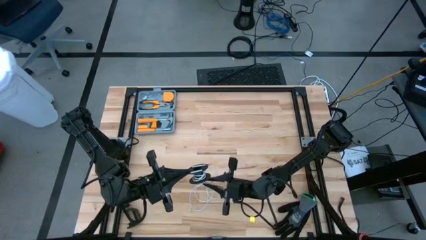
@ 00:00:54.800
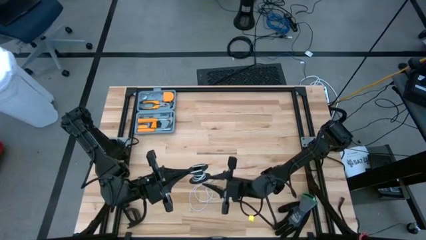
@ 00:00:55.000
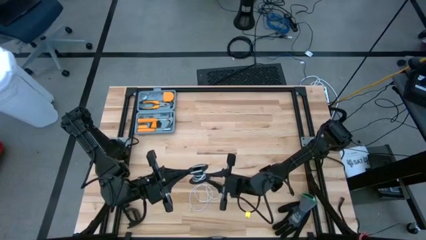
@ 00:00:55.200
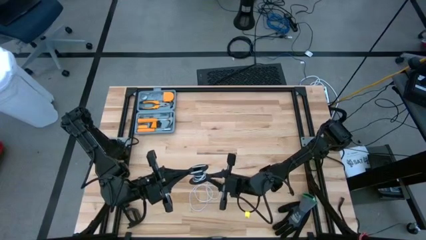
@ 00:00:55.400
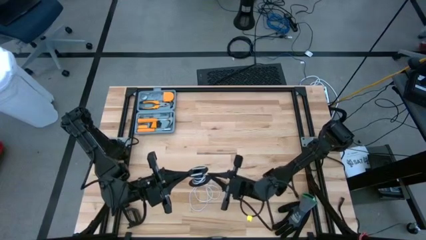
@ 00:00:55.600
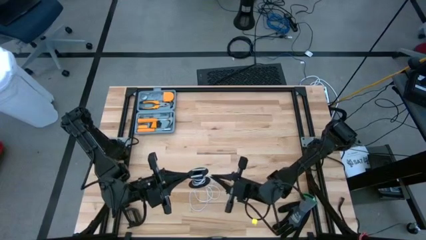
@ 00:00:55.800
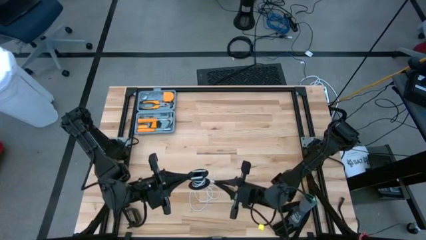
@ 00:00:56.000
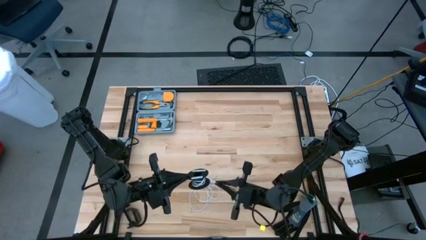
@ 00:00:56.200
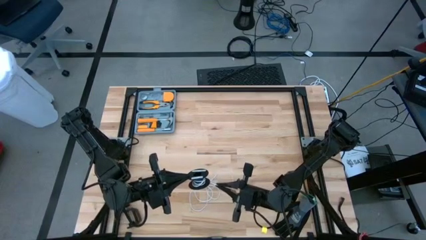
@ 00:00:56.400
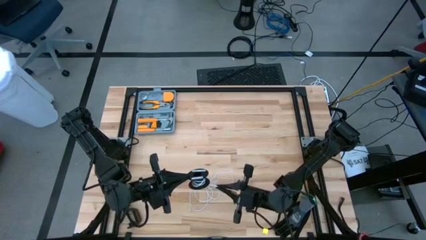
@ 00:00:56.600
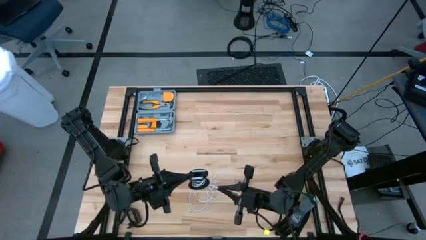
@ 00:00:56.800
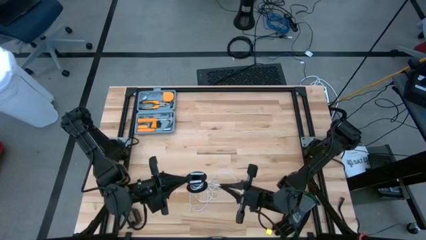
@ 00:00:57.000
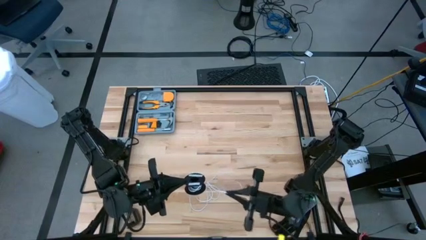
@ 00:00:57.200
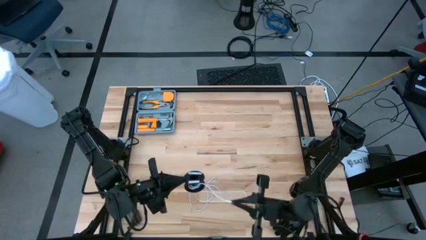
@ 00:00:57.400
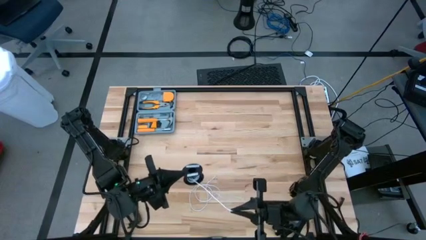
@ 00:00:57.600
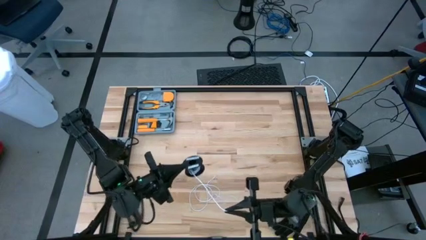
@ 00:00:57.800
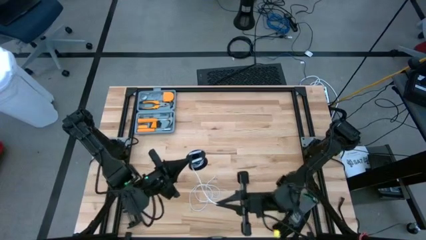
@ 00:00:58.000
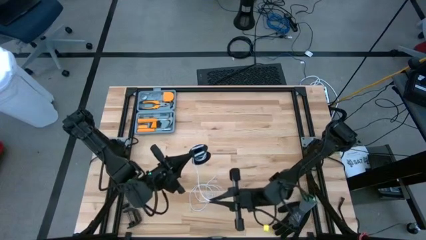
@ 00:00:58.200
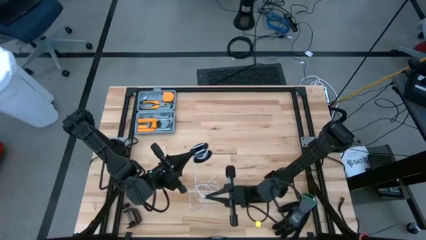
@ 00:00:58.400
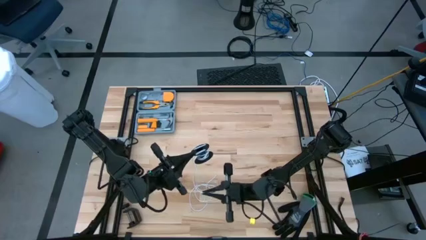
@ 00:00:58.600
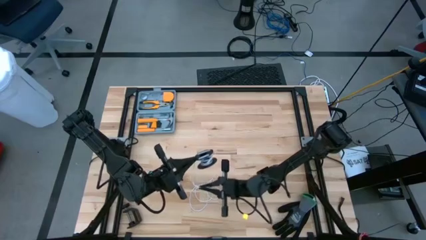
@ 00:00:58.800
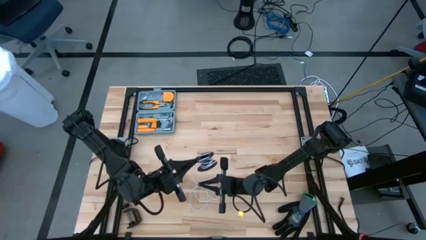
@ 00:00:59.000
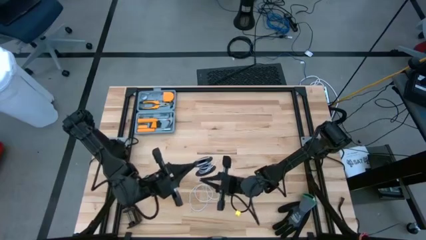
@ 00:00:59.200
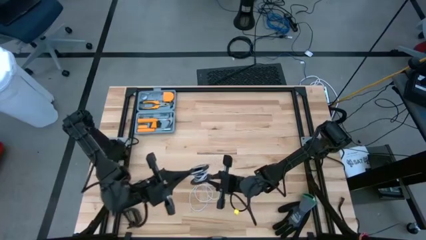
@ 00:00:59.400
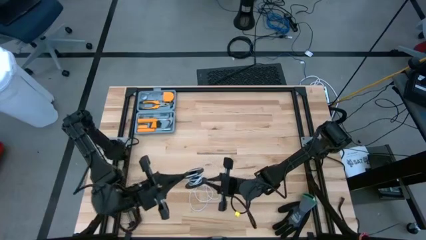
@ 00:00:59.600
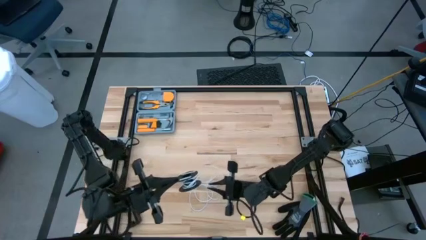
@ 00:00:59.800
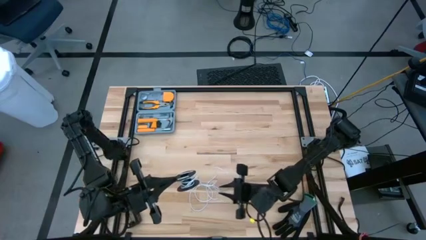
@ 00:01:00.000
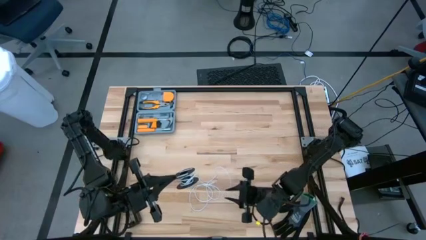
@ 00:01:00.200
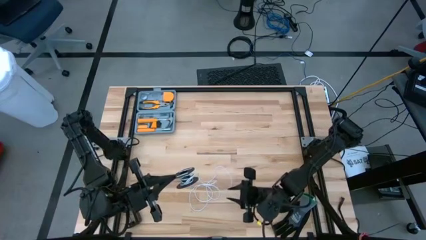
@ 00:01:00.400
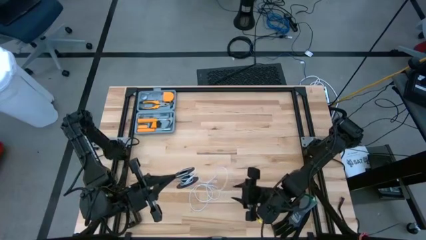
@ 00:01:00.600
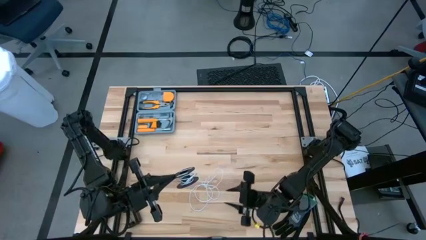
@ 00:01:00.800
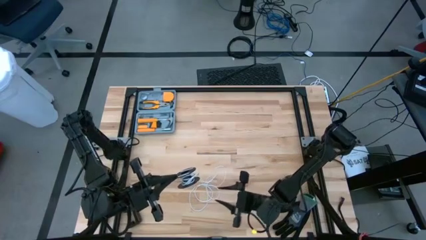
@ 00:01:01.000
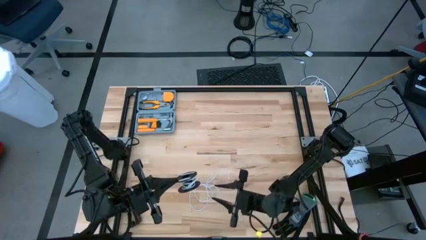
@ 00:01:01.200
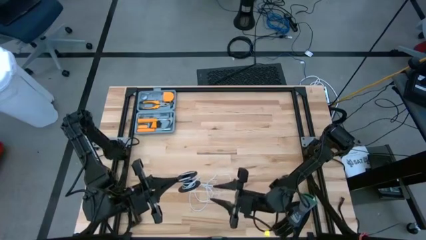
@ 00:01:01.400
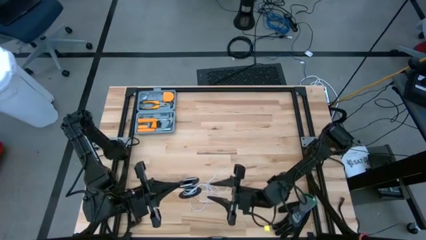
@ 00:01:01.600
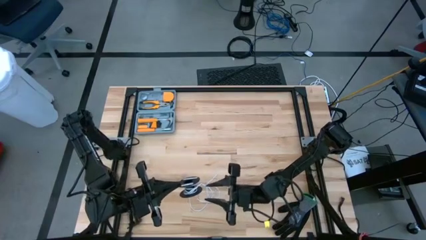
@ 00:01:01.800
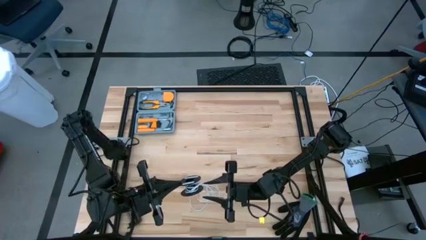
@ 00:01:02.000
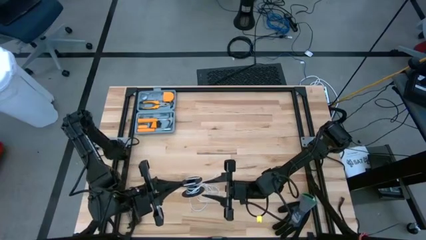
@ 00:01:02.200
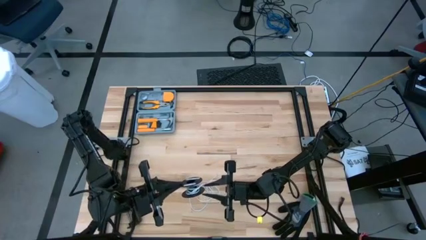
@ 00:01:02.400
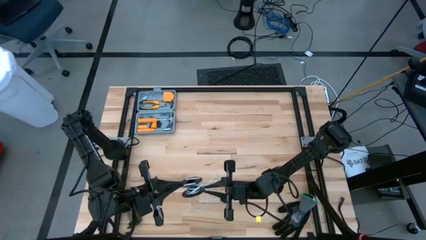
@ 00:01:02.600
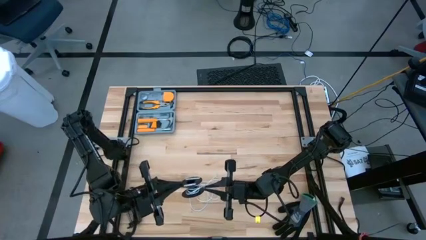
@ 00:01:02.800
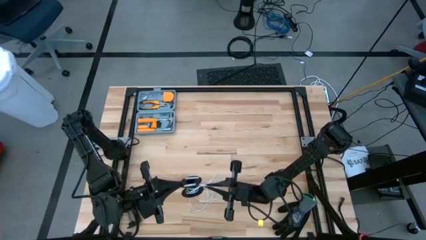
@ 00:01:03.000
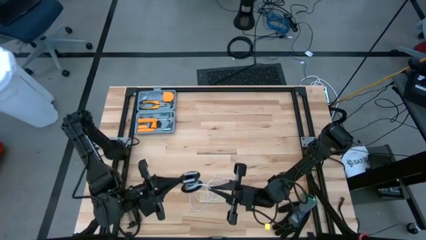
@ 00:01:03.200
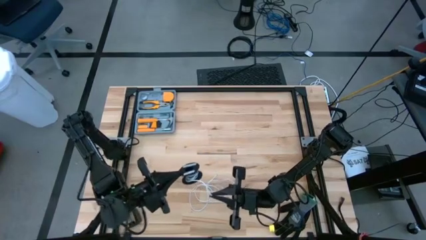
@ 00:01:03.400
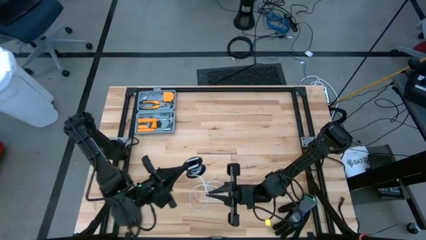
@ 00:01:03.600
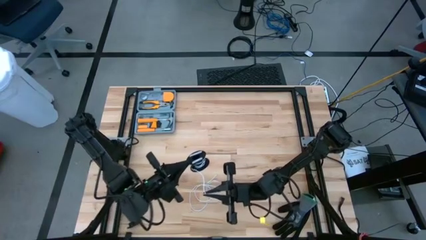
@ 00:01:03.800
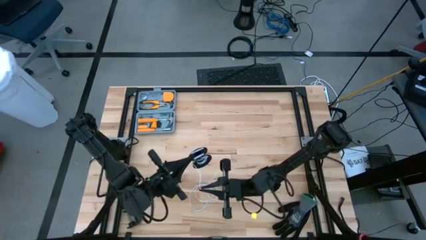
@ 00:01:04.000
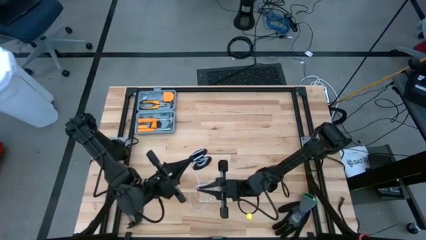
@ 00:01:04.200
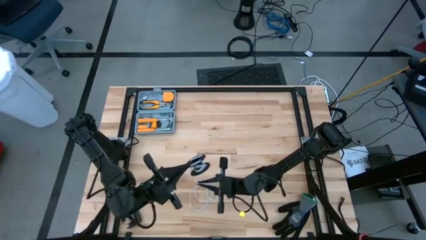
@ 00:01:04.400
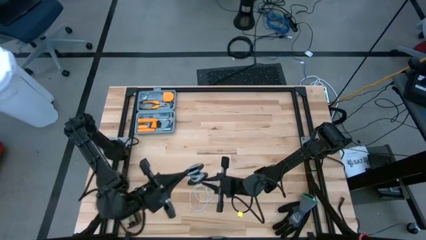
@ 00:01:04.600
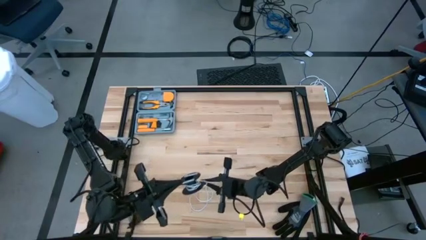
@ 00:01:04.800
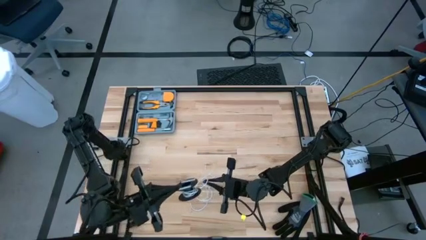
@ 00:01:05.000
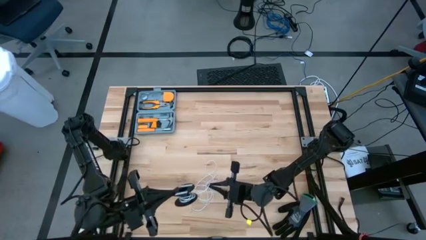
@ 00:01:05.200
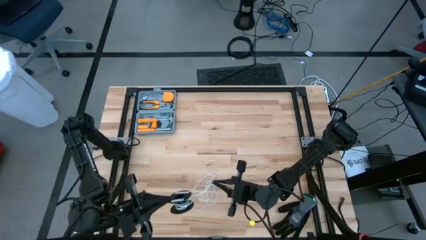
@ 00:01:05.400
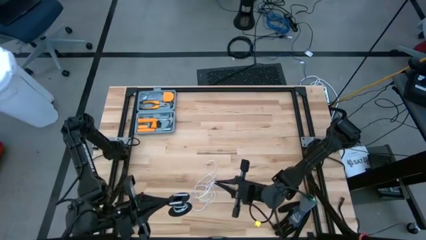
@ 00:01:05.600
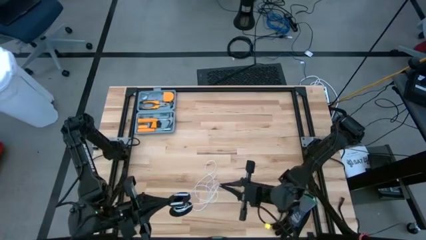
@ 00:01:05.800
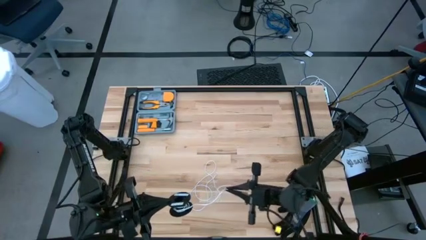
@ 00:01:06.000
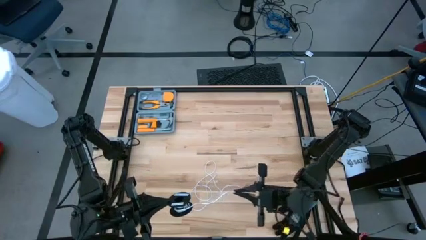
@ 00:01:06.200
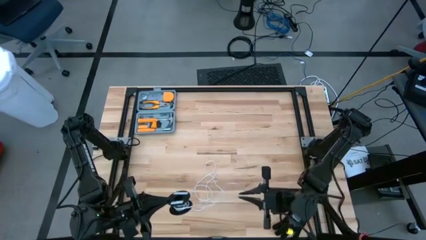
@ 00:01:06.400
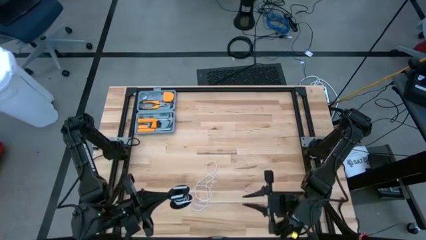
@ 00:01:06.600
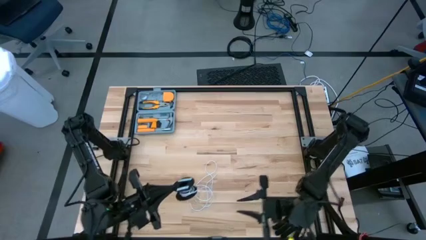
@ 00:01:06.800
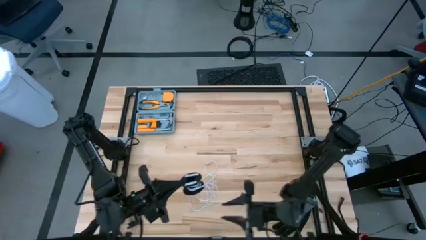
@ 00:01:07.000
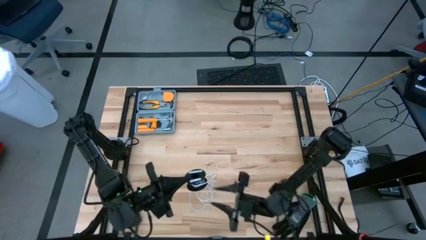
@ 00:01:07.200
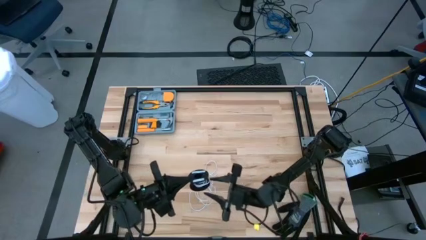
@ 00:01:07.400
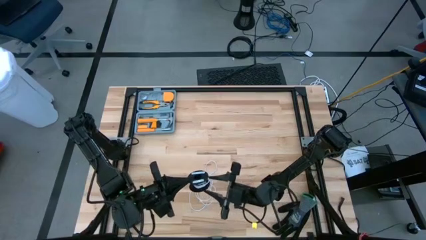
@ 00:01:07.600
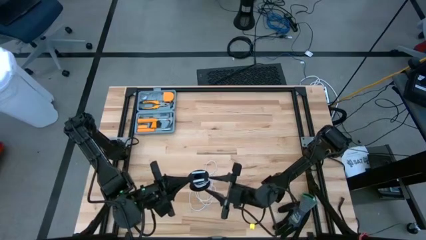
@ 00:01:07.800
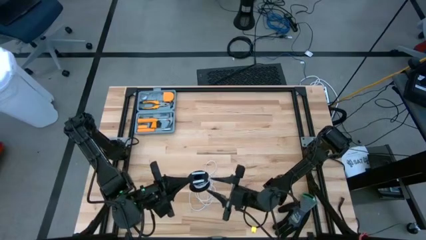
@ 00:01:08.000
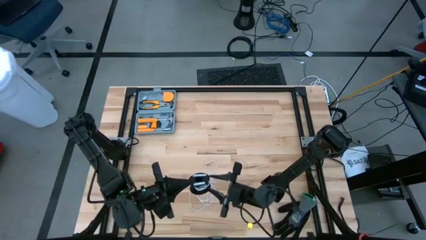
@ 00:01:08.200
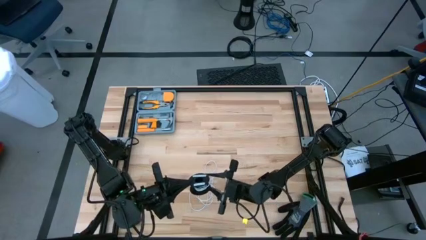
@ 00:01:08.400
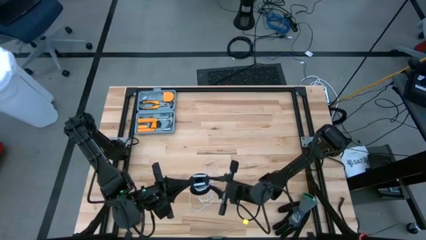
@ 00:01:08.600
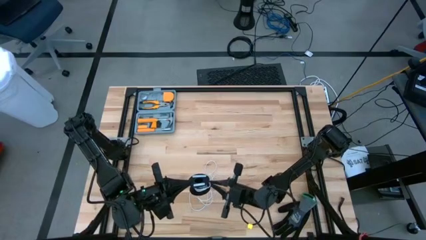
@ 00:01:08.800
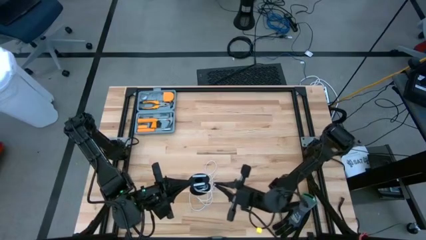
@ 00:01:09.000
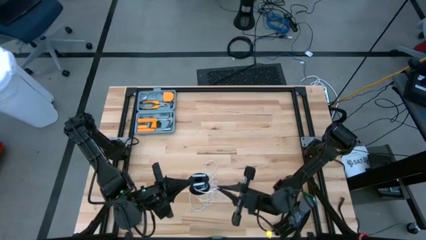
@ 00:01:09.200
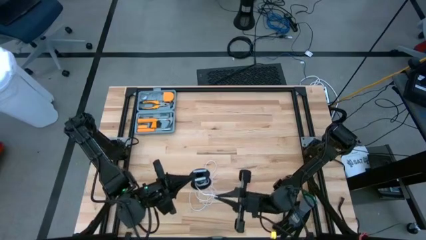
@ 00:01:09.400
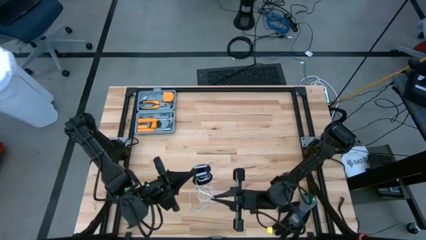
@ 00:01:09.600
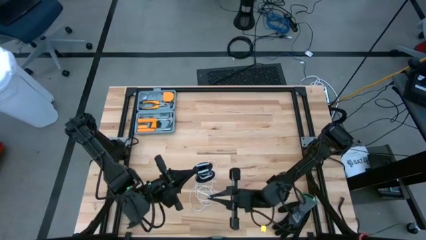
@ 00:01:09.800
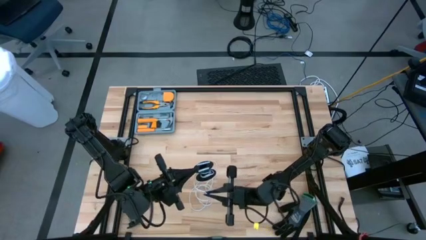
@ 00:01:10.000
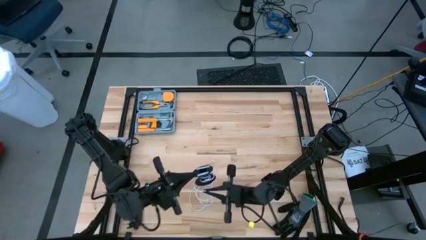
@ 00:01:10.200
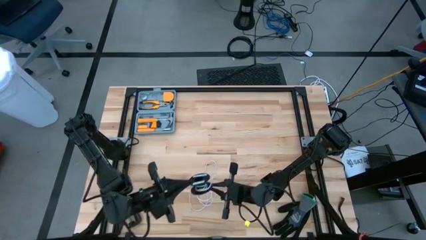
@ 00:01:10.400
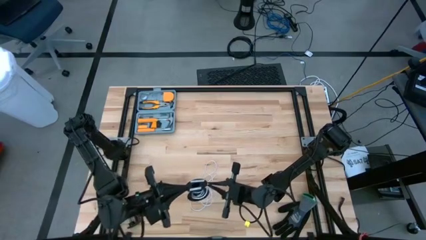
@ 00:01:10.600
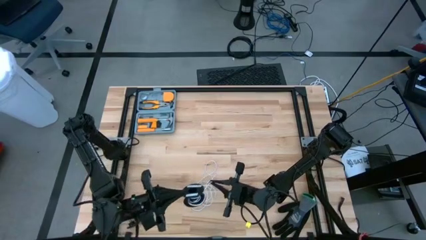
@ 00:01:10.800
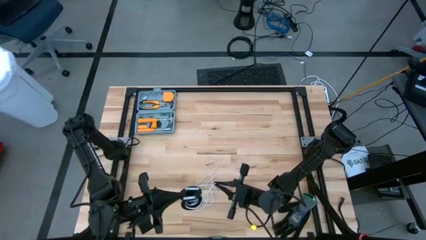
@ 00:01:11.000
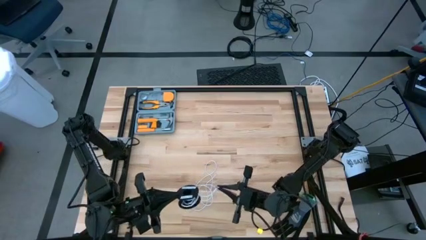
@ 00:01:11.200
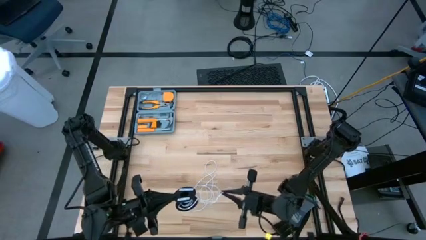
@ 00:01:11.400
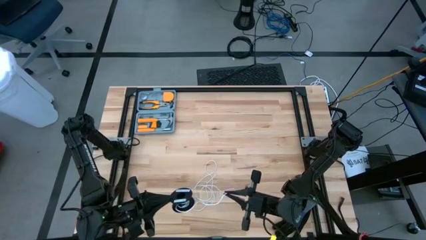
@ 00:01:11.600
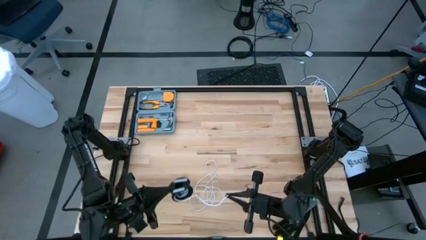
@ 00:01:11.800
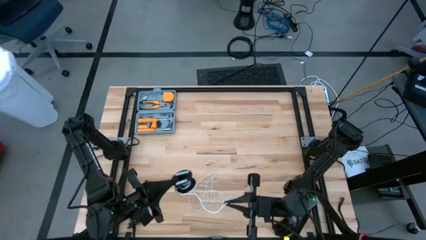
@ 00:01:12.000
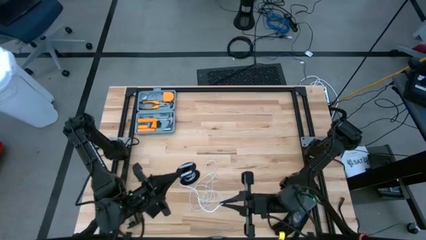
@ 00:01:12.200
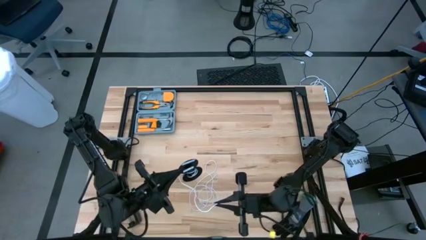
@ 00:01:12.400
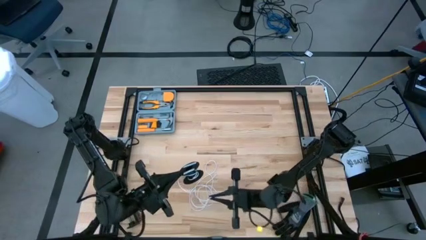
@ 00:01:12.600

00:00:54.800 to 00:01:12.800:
Task: Coil cords
Uncoil the white wire from the spool
